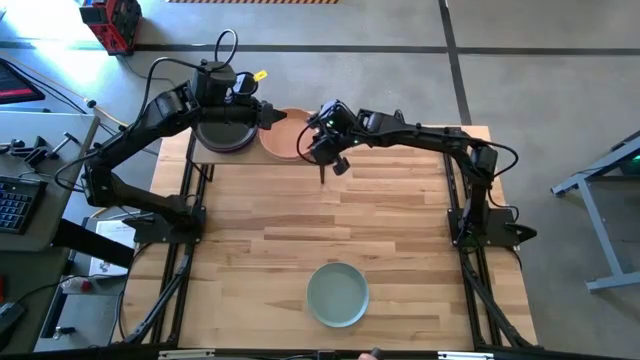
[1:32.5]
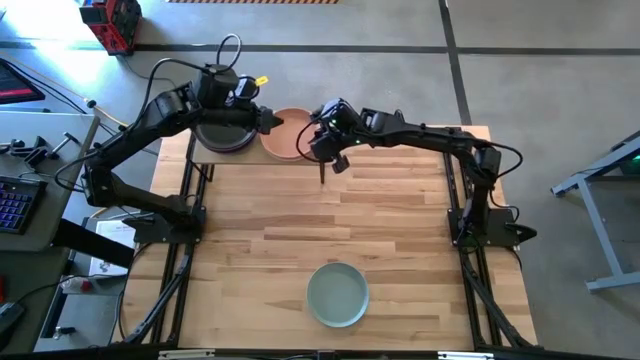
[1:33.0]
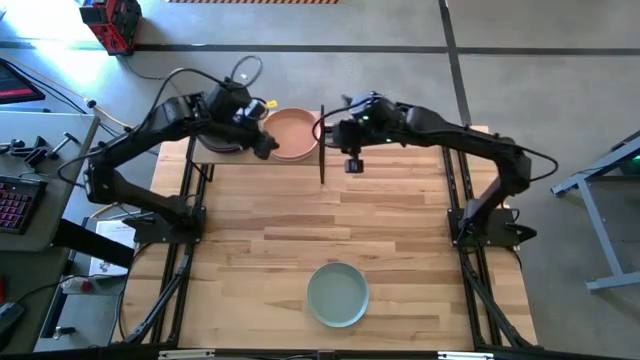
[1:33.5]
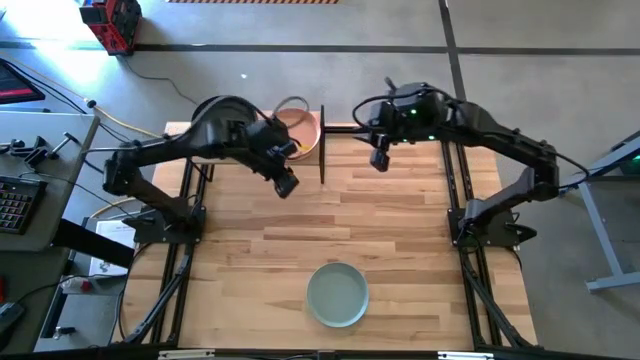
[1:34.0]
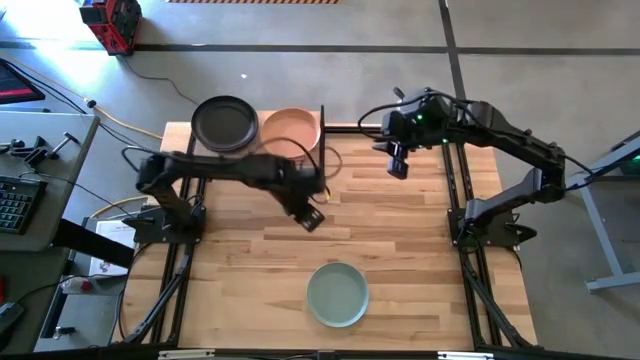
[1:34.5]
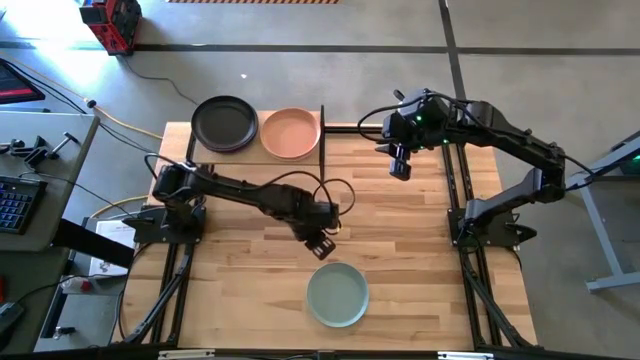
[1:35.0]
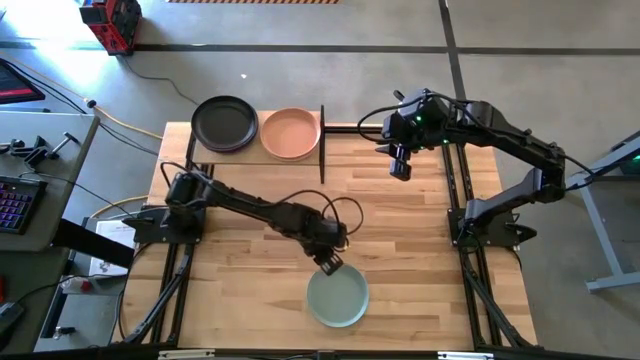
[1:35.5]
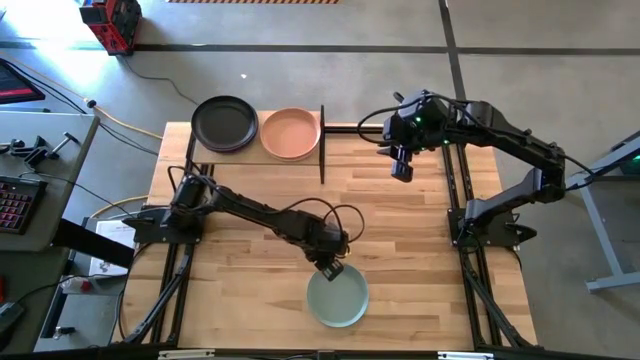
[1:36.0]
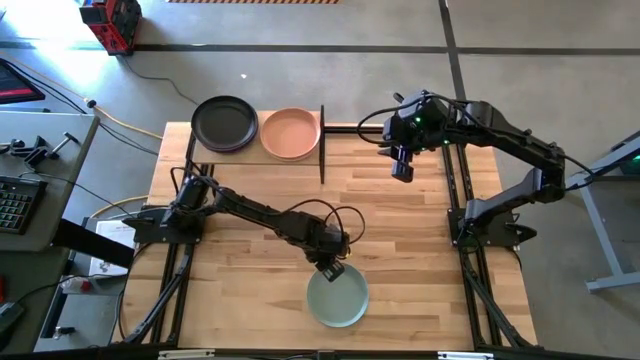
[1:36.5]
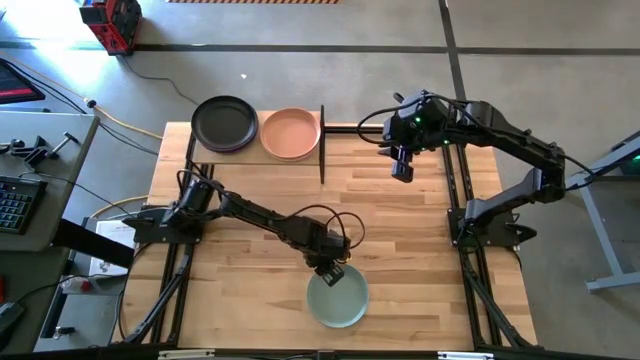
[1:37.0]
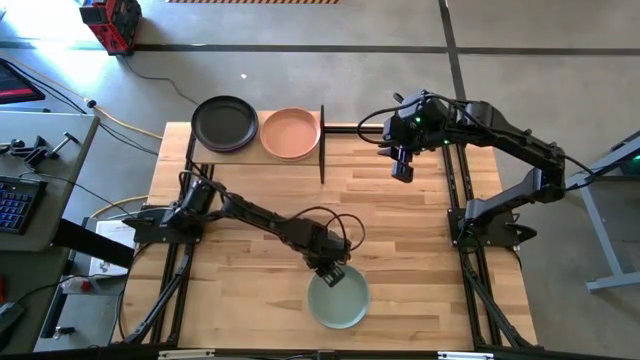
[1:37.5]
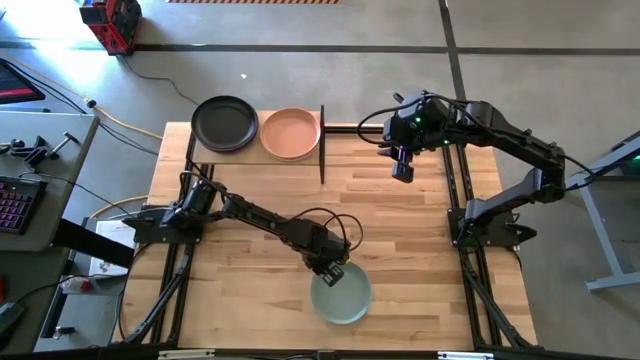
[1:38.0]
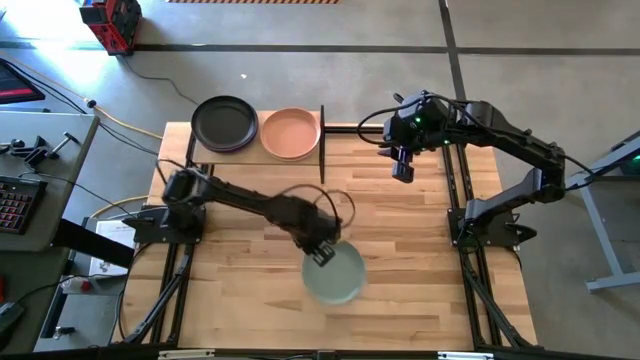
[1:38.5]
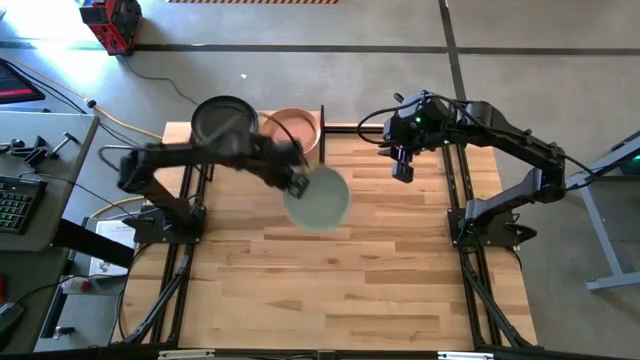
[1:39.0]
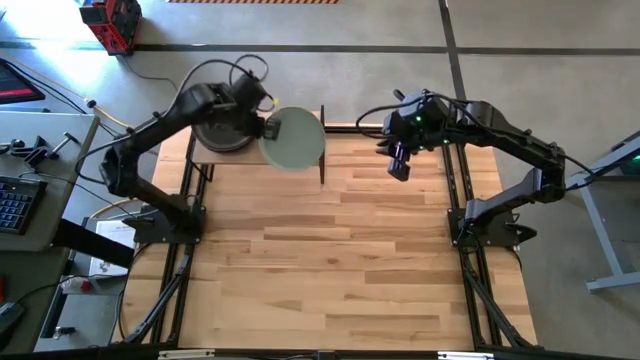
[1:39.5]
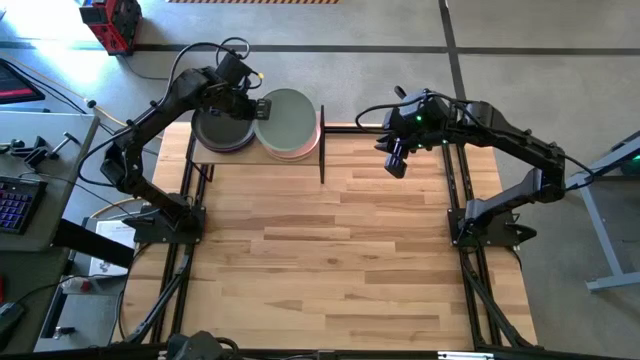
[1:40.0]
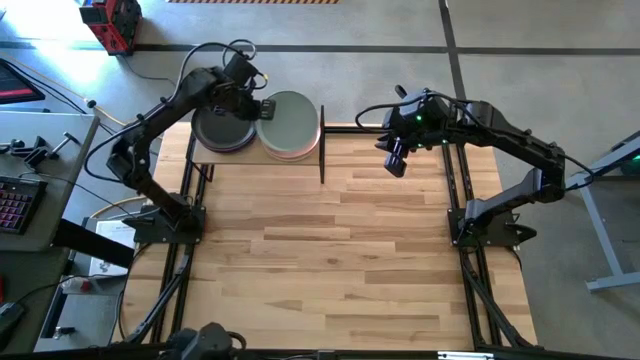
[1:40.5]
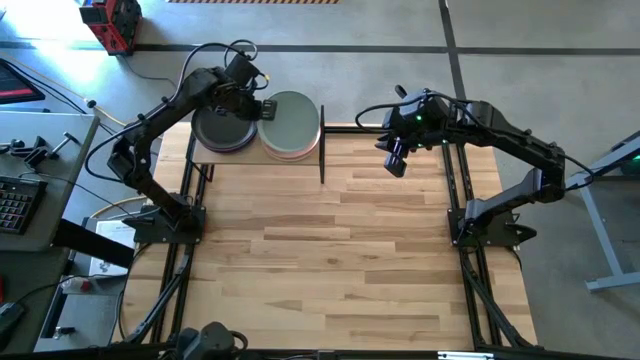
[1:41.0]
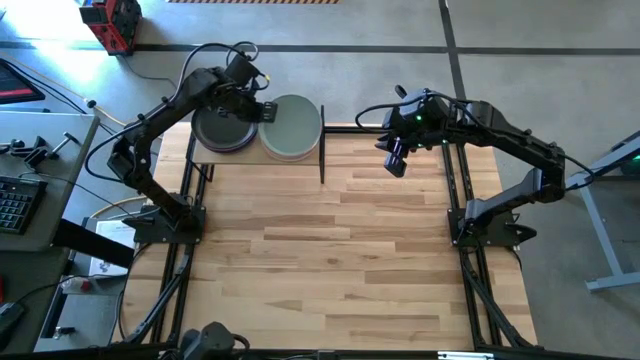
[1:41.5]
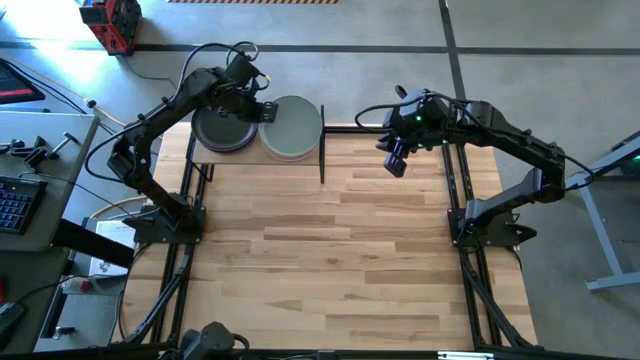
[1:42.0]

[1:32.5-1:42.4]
Task: Place and stack plates onto a shelf
Stack the blue plate on top of the orange plate on the shelf

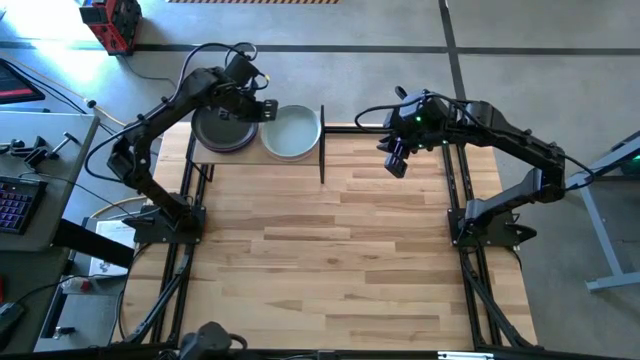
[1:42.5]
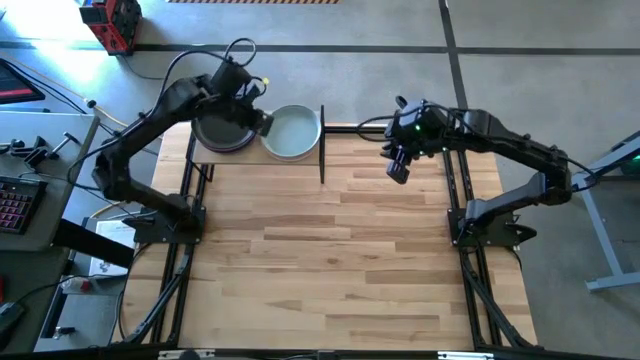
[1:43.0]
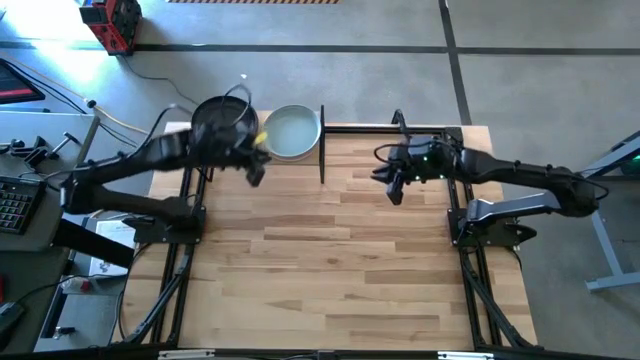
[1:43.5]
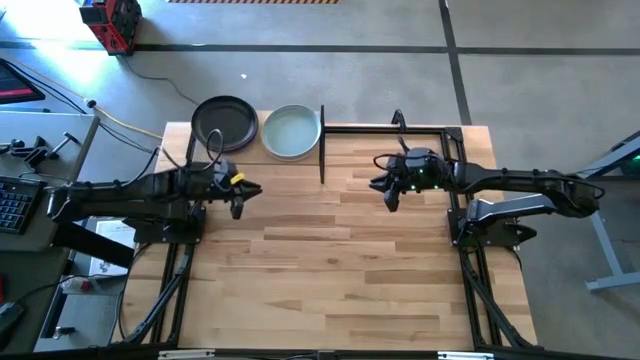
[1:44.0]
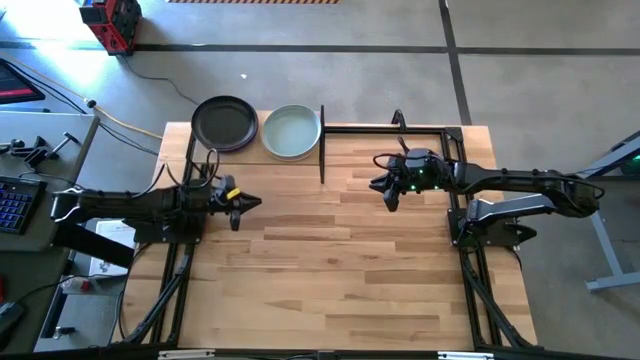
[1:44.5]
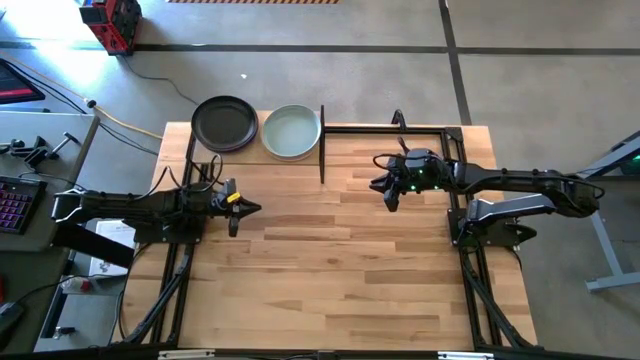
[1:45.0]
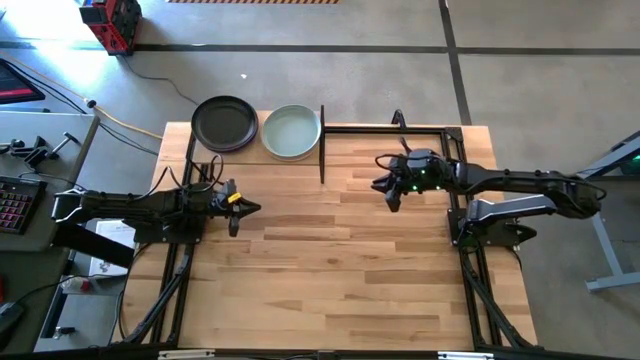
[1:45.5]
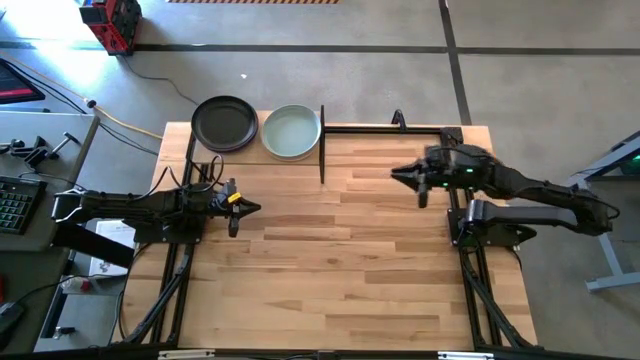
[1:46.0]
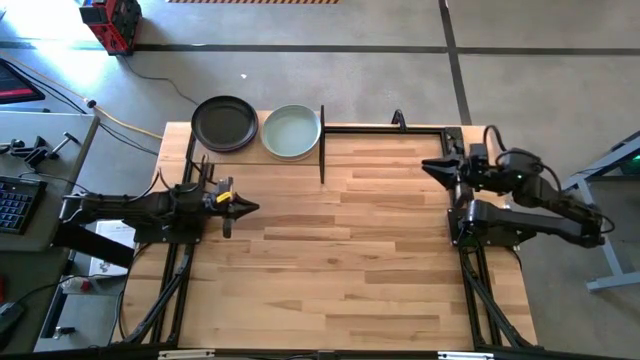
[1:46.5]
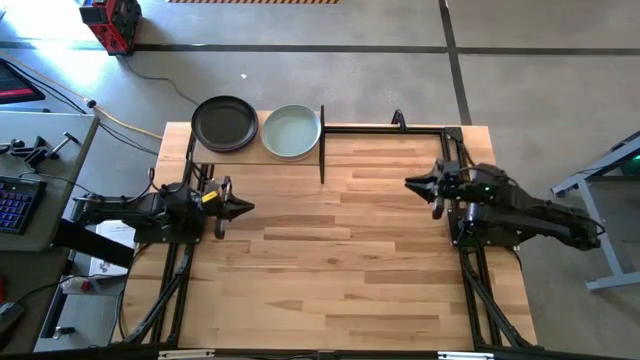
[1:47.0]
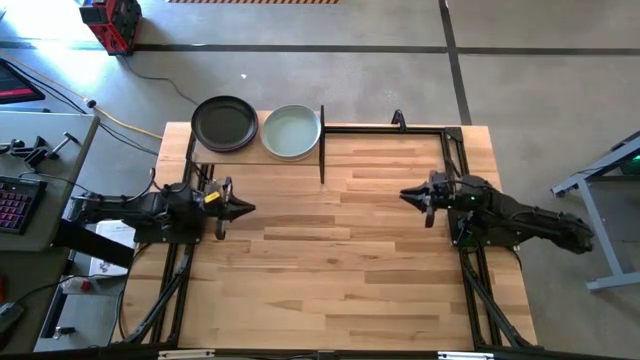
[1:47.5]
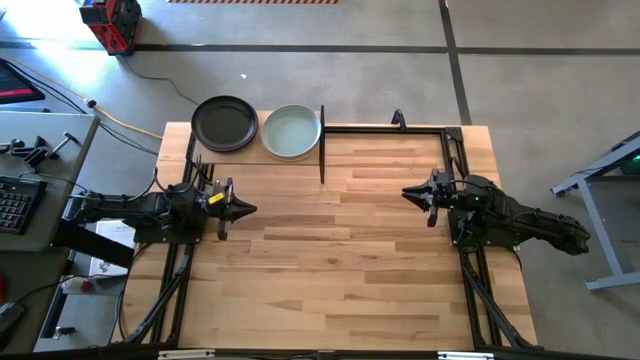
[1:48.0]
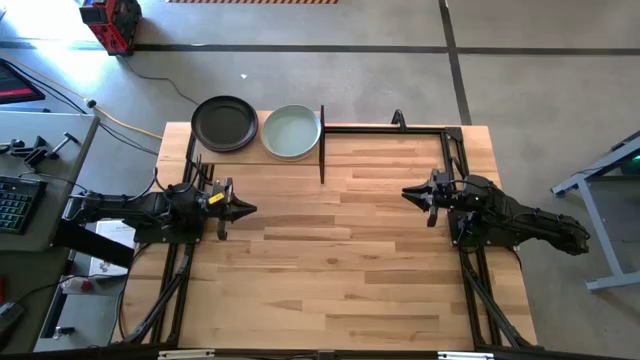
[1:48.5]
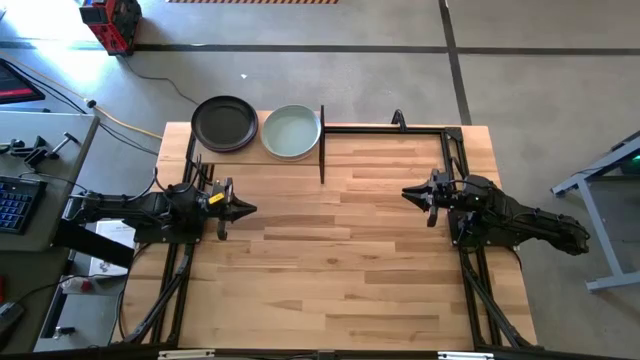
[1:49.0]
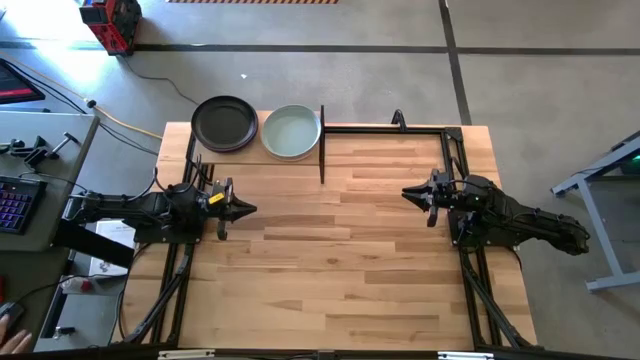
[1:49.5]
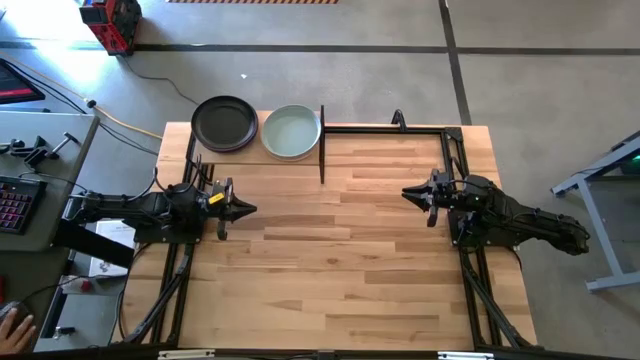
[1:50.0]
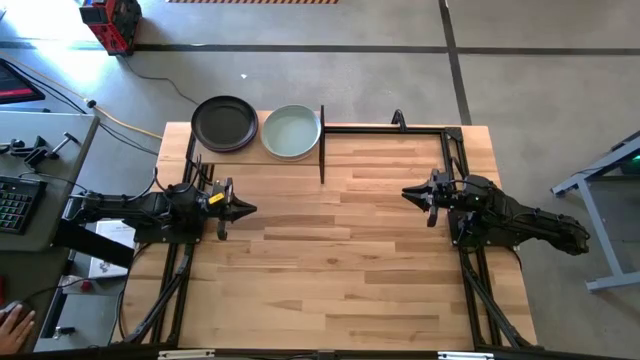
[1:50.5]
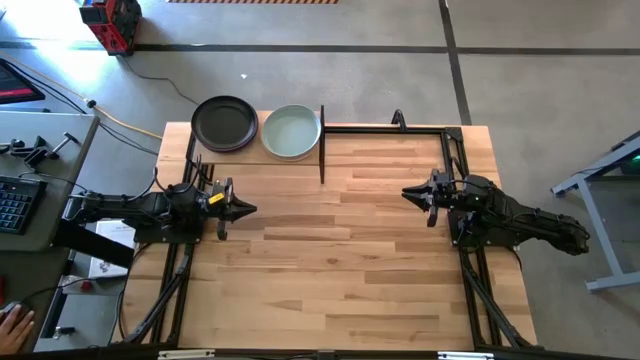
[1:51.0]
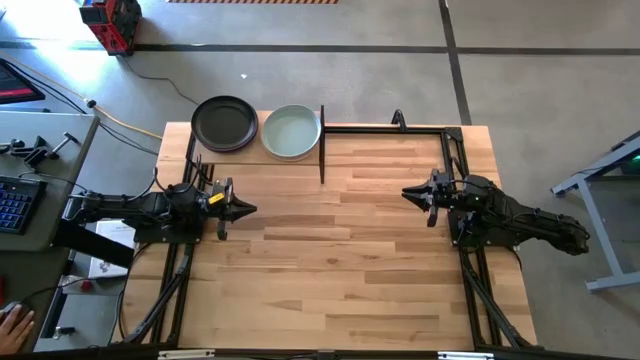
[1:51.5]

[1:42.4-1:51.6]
Return to Home Position

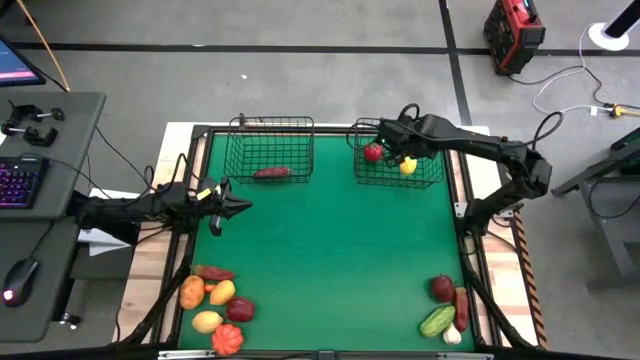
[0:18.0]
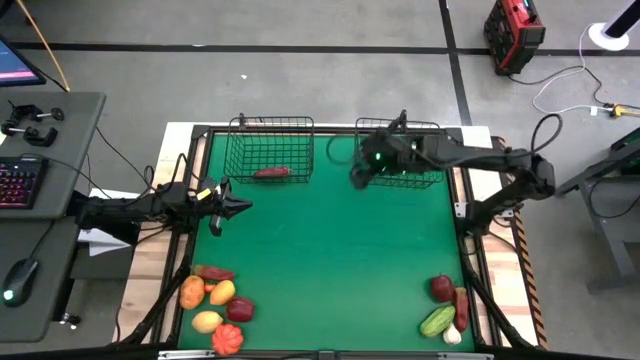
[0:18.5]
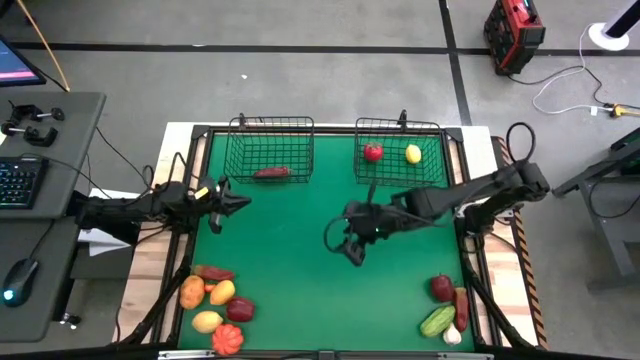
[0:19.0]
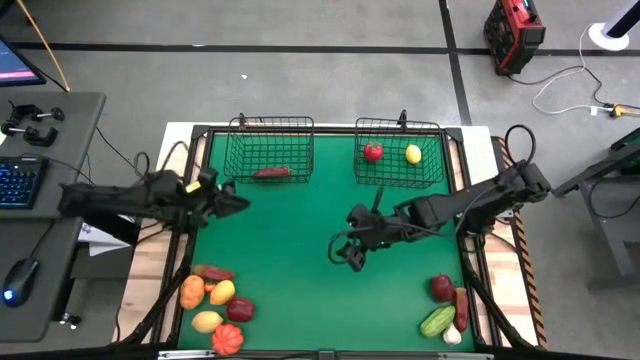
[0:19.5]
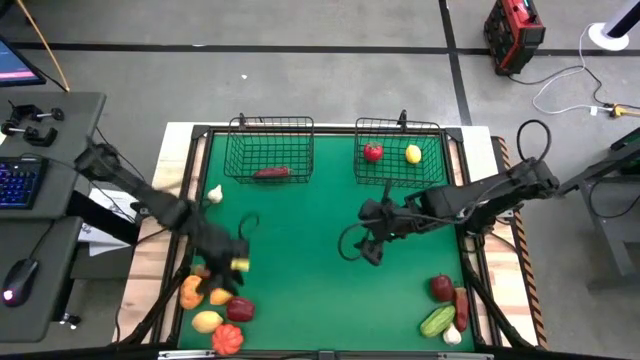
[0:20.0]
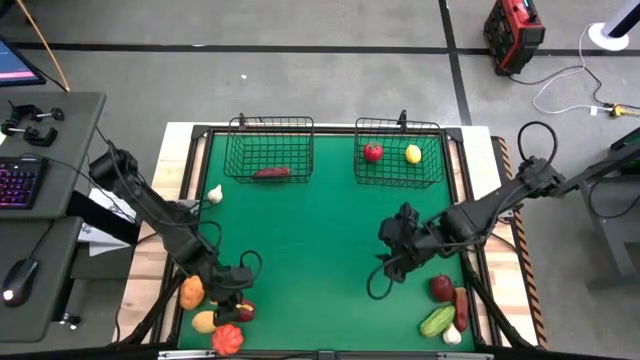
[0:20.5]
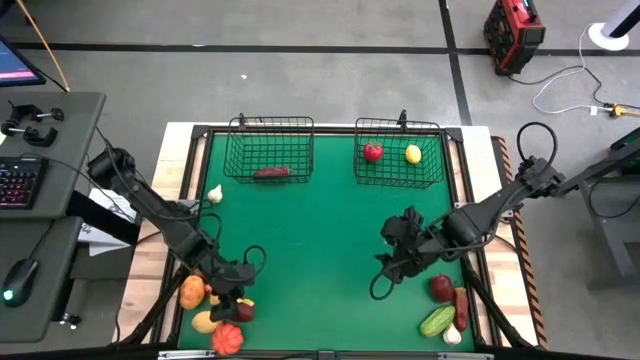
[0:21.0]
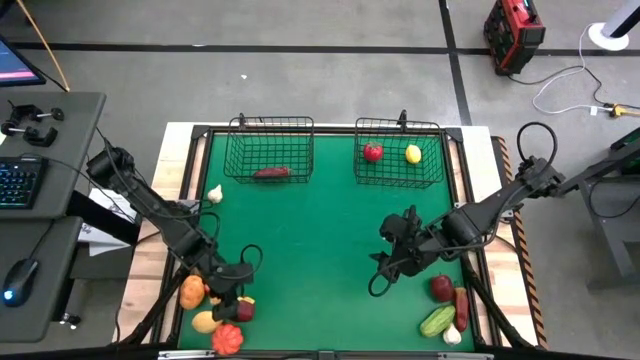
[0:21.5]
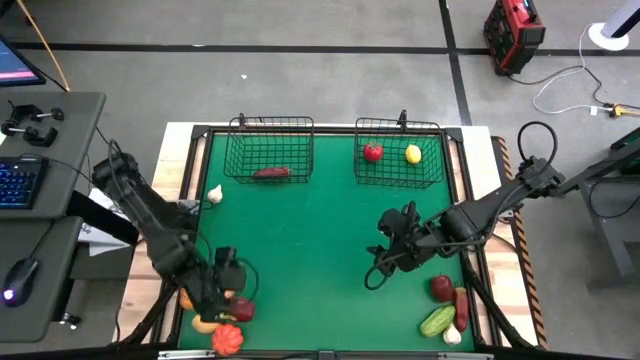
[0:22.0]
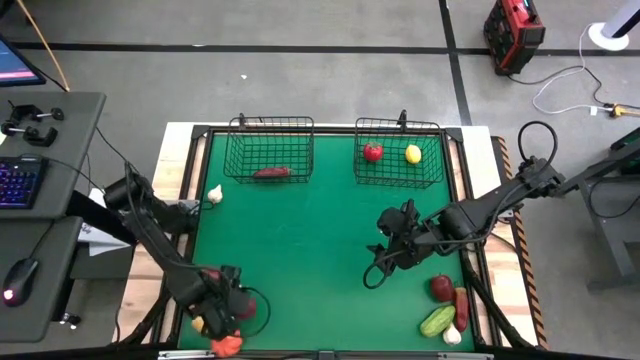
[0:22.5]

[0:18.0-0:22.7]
Task: Sort produce into baskets
Put the left red apple in the right black wire basket
